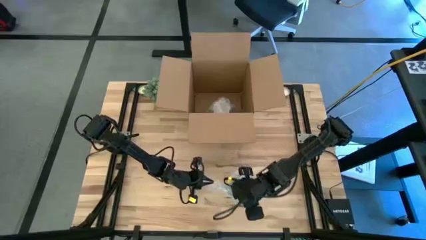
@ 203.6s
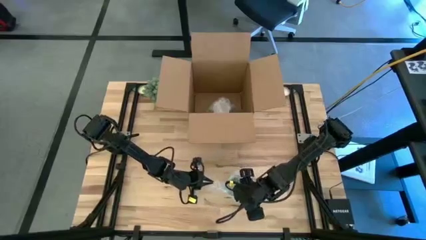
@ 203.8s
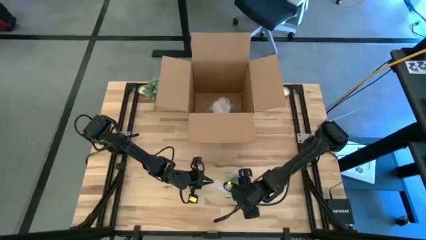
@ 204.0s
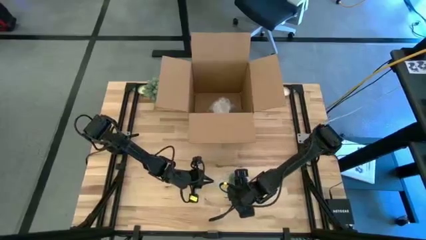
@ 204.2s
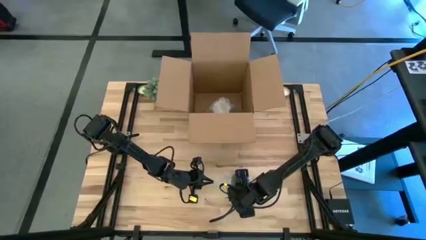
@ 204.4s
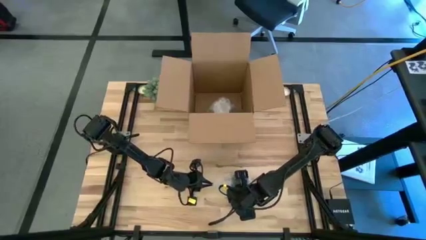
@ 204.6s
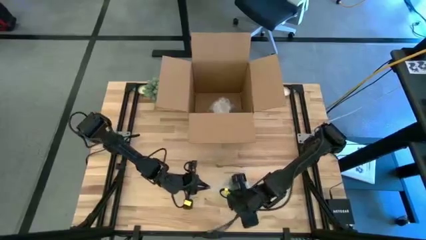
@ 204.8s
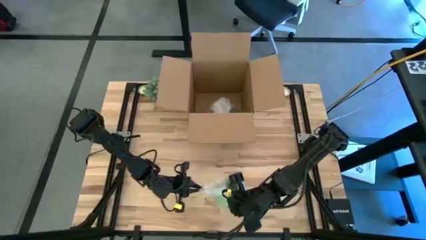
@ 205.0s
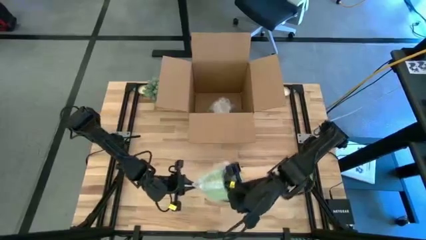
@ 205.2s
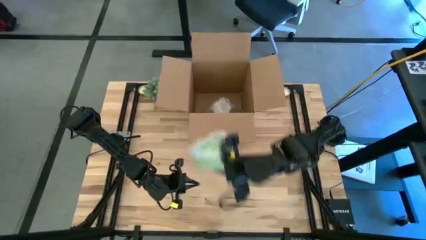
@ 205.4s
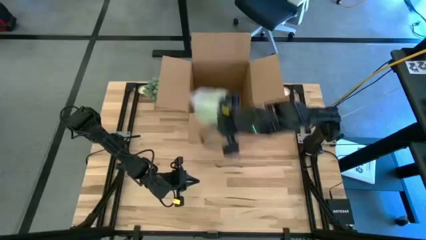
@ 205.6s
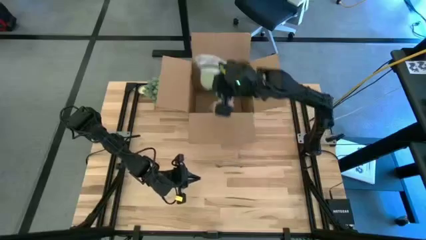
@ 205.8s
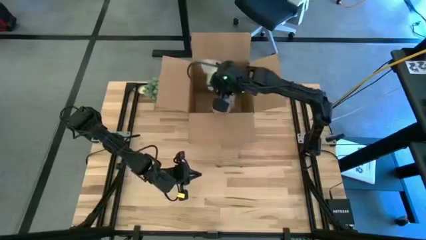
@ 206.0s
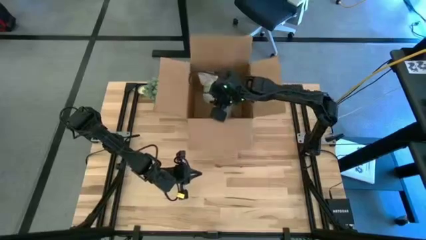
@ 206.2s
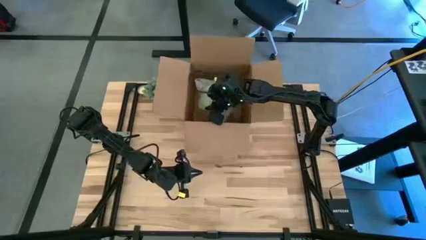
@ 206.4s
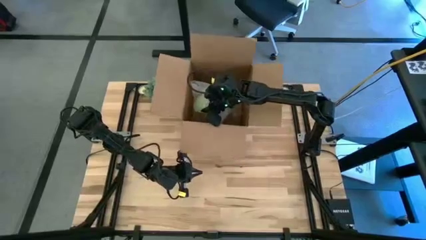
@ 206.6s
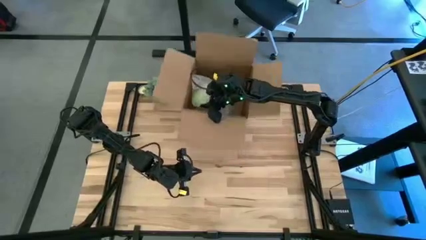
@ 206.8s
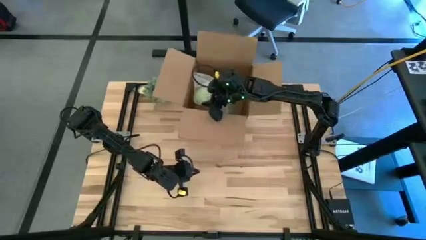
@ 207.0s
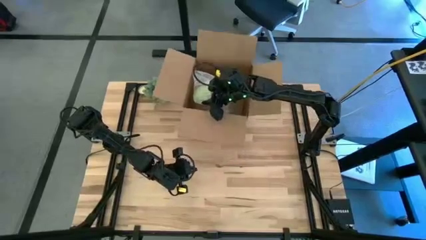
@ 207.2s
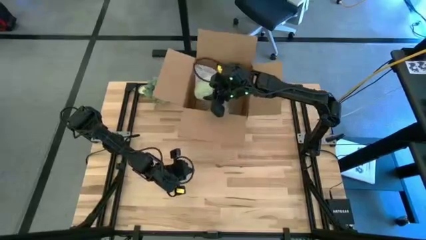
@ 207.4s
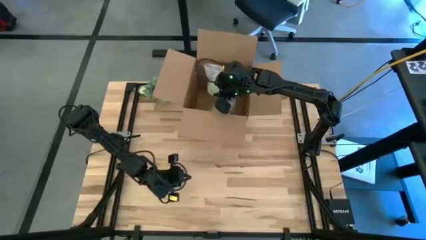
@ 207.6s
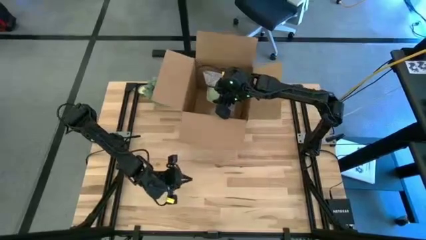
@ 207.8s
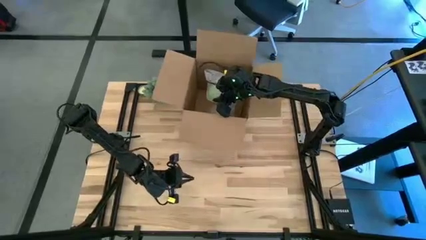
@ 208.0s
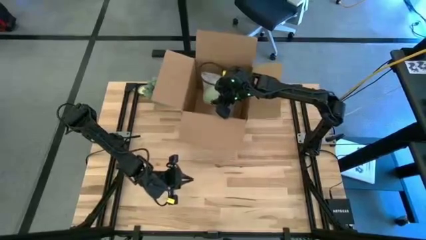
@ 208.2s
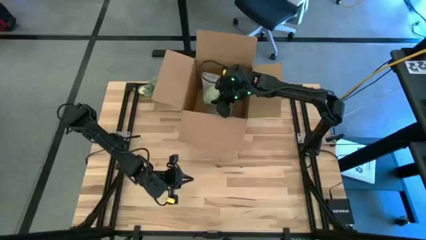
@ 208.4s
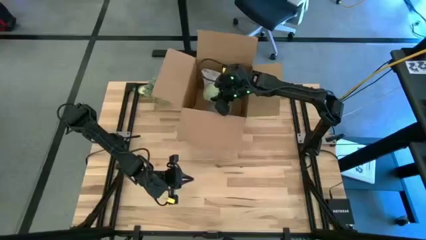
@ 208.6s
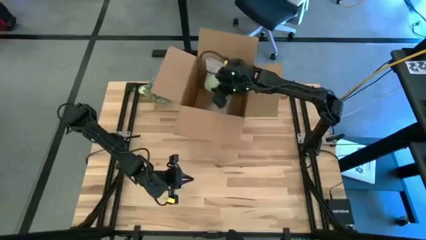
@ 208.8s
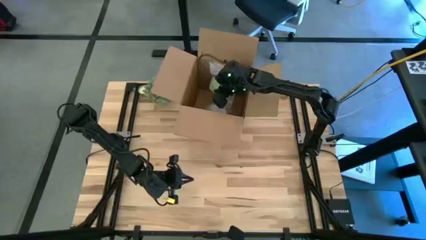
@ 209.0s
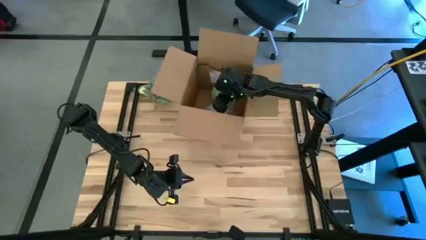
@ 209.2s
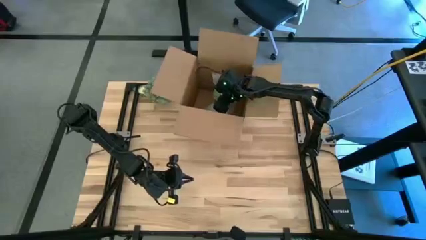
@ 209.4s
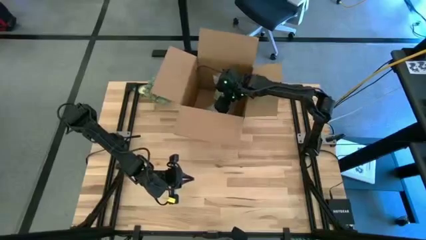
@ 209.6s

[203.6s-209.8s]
Task: wrap mug
Put the wrapped green mug into the box

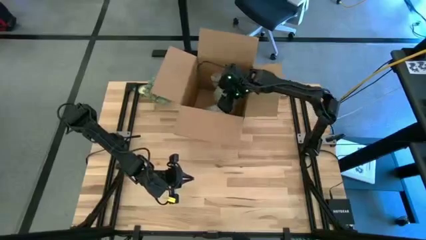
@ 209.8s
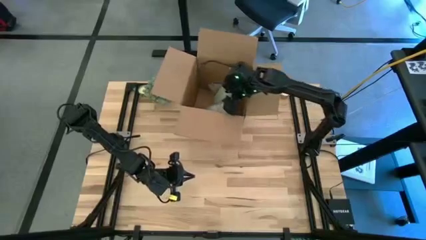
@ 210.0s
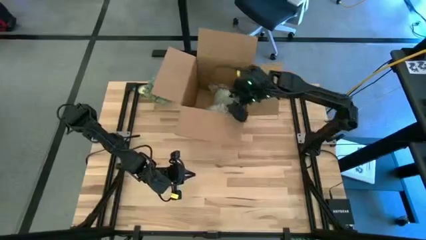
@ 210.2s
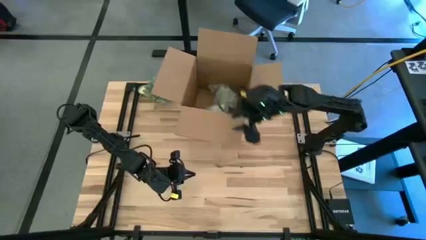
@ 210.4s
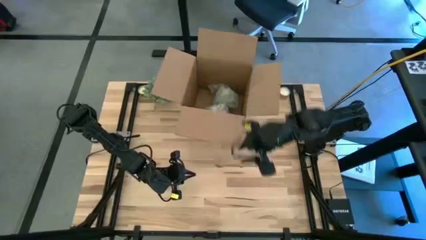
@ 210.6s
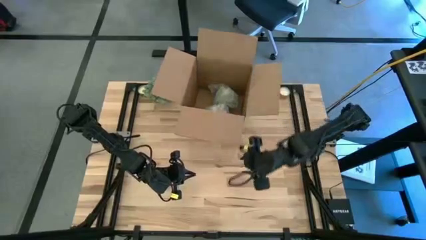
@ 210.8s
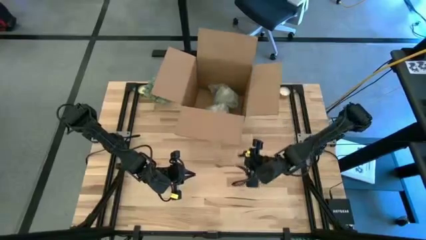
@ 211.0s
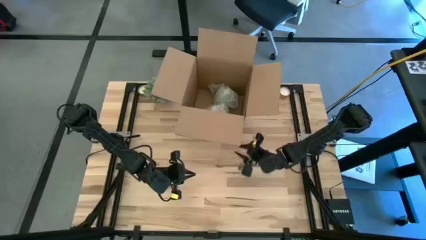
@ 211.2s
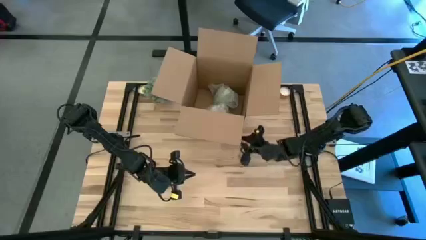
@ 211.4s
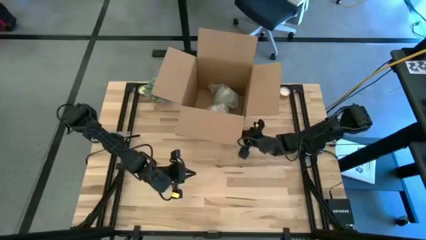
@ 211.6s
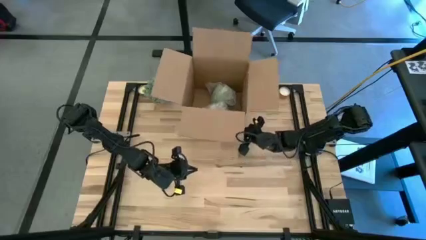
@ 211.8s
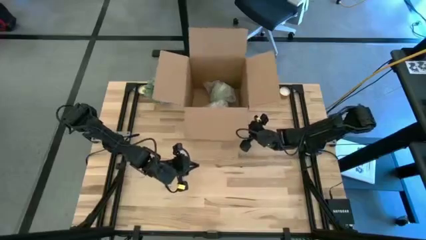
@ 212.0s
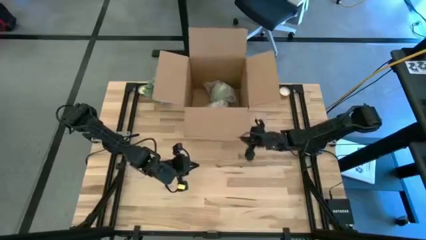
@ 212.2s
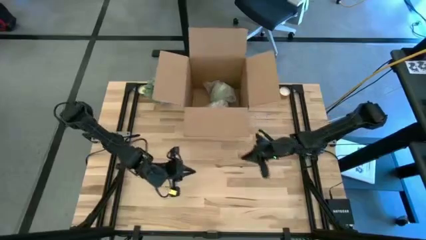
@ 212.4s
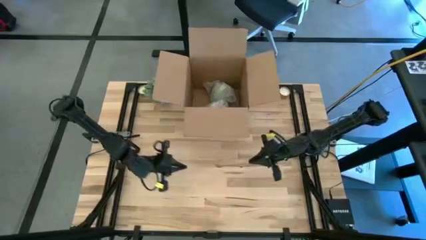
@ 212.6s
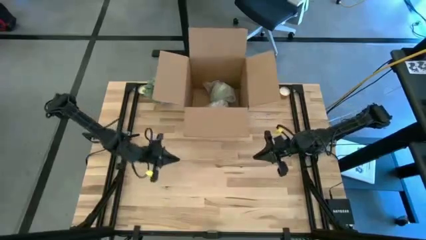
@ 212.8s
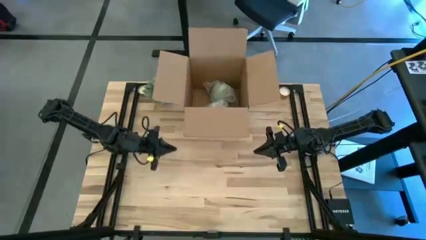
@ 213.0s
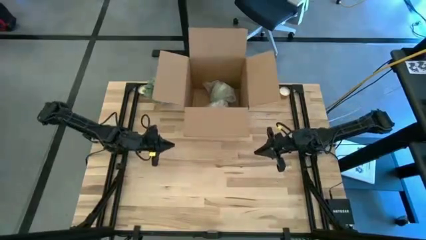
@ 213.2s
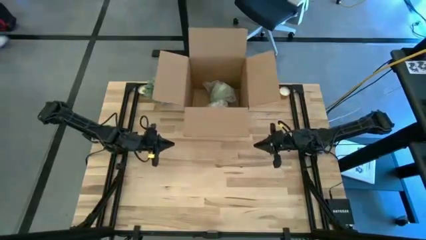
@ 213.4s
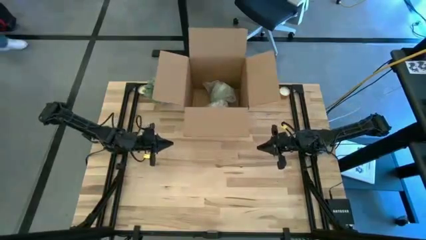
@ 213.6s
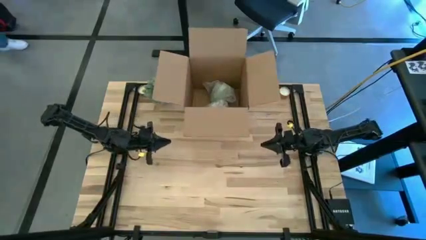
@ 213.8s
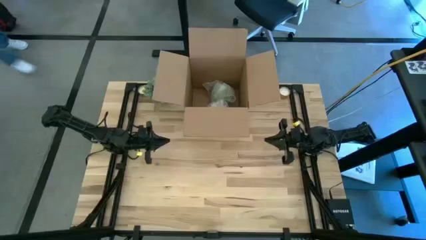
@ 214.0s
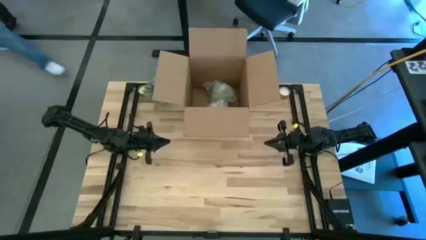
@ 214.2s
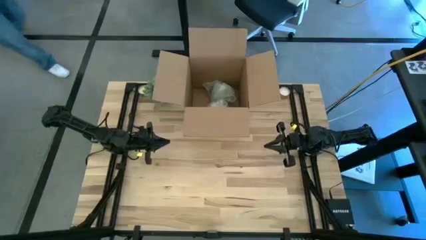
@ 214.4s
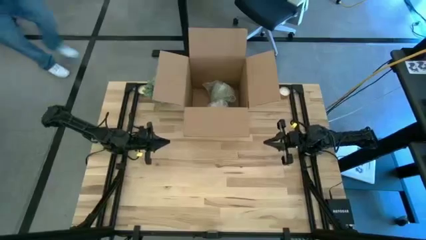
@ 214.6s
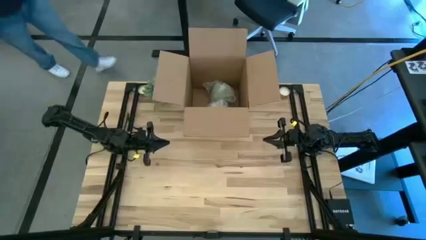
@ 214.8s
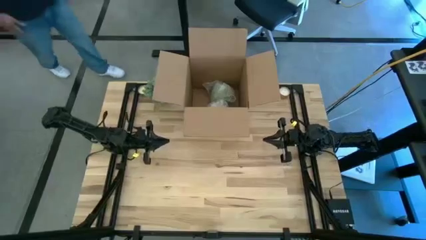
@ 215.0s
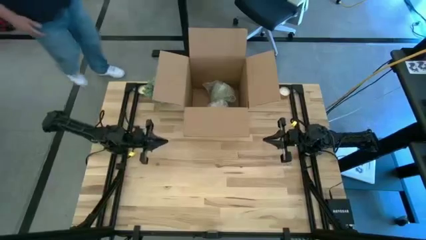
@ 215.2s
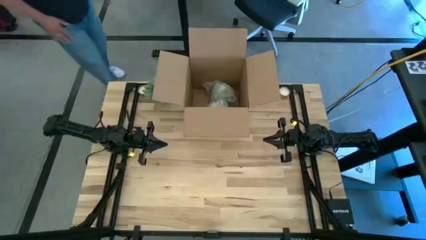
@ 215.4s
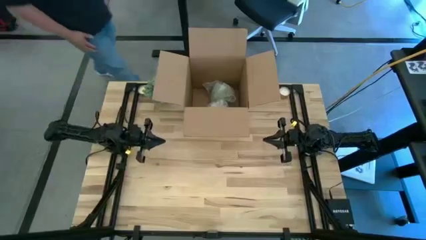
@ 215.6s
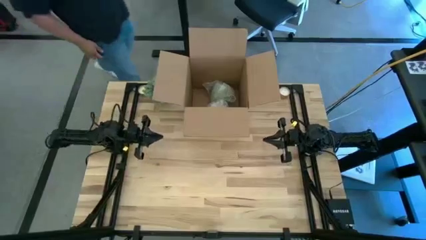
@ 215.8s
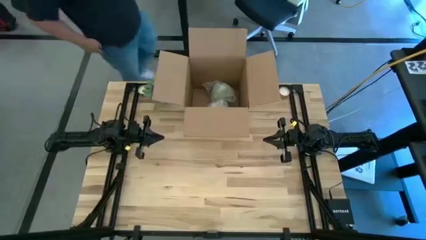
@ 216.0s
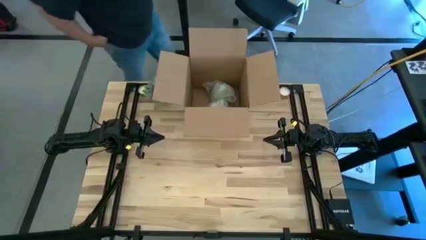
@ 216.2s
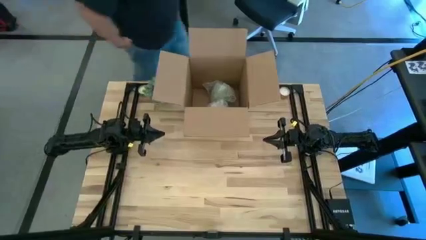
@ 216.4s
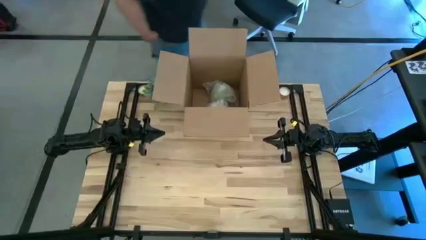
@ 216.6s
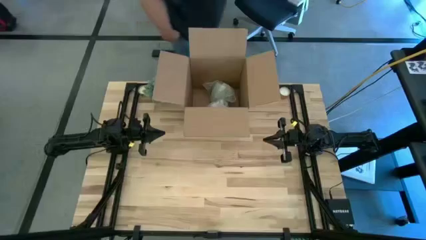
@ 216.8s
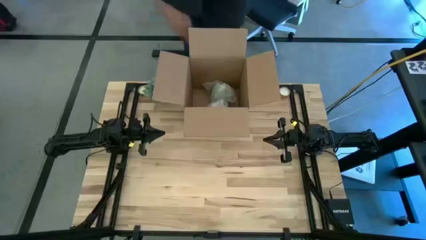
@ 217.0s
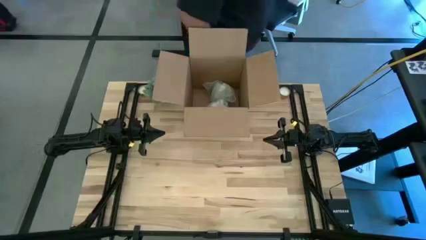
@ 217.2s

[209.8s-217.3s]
Return to Home Position

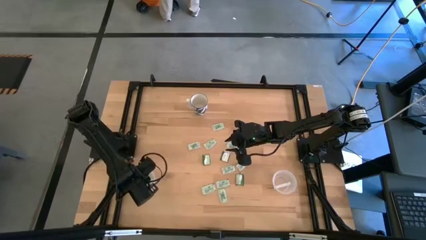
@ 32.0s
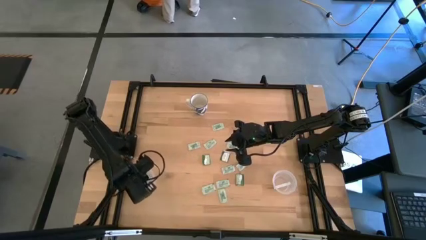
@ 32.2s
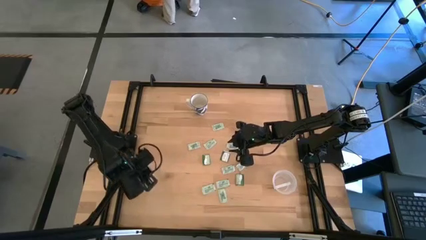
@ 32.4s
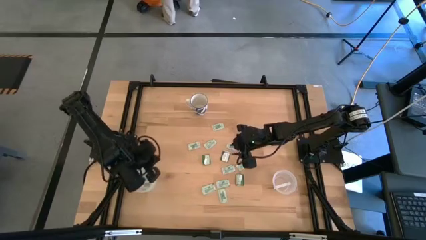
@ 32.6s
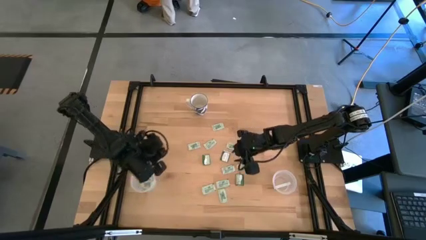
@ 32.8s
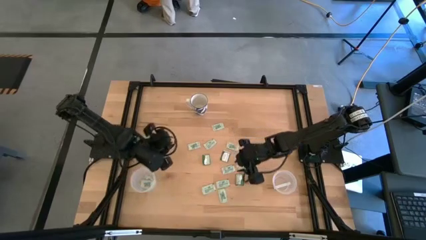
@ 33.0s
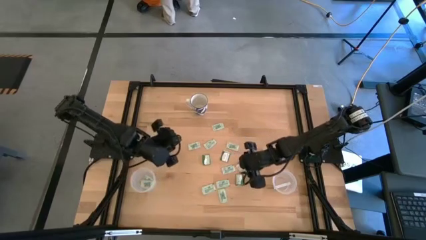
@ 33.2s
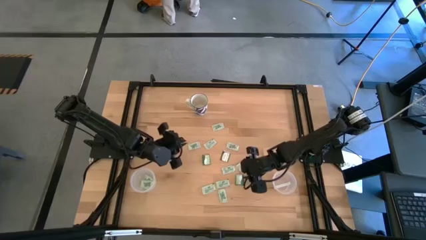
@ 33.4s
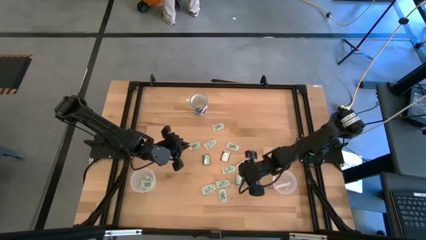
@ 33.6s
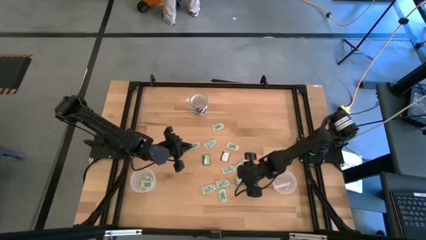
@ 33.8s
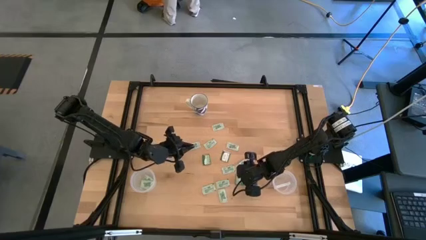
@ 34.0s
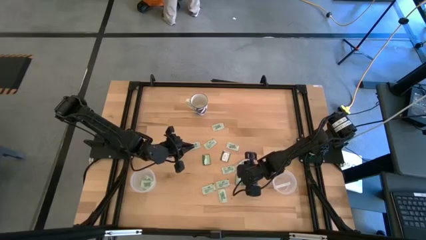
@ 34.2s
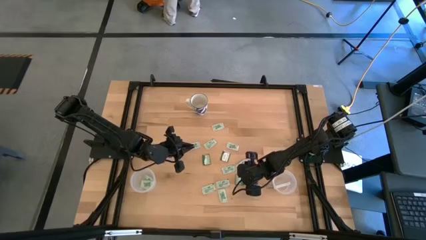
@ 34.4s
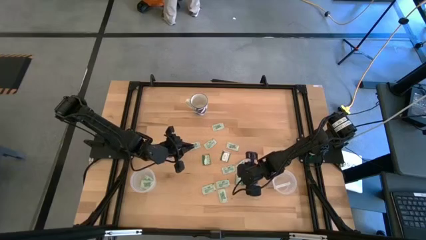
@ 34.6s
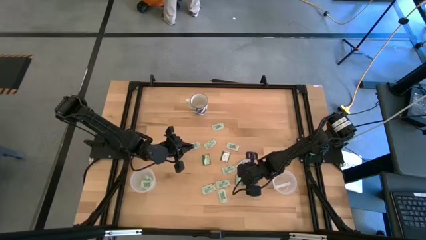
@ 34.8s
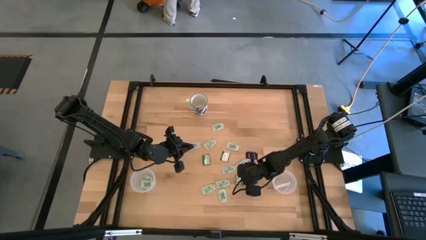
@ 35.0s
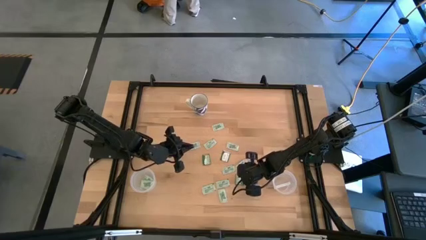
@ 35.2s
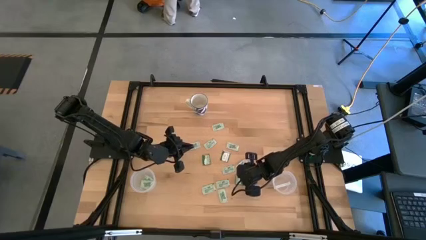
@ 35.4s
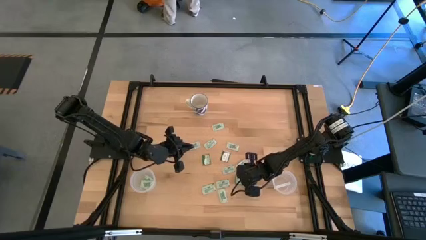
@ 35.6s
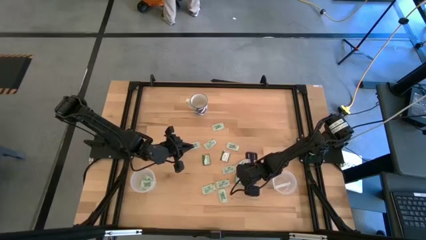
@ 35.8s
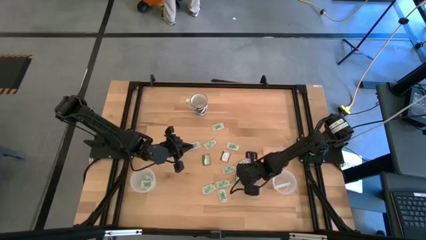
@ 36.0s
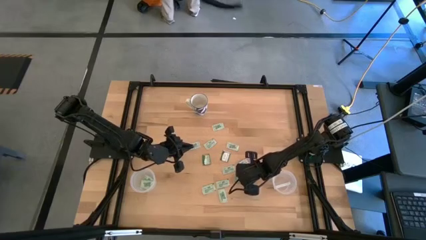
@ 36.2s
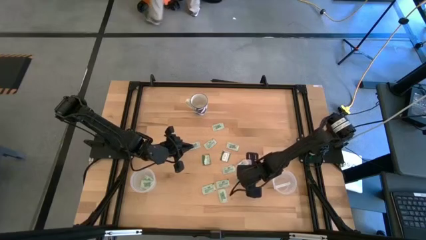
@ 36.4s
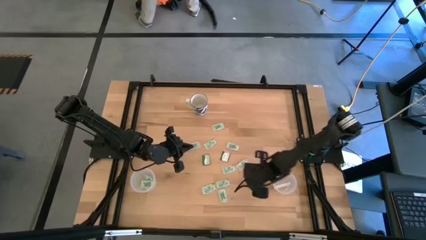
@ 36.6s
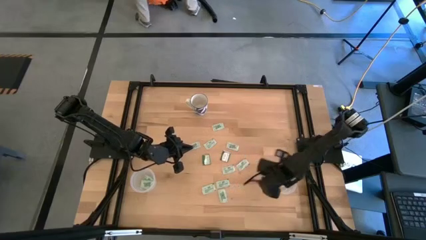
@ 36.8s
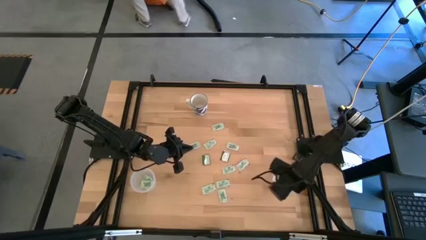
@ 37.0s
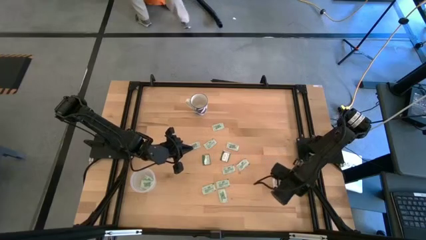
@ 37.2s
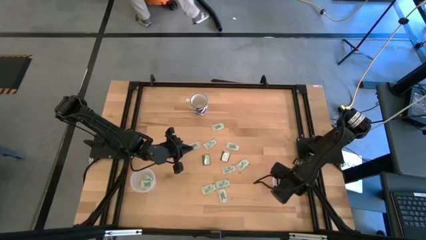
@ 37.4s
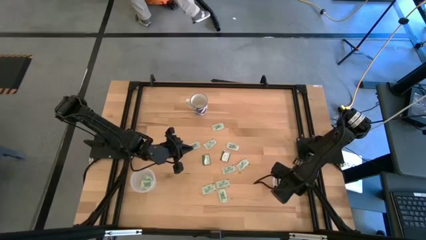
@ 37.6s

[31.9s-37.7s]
Task: Pick and place Stevia / Truvia into bins
Put the green stevia packet into the right transparent container
